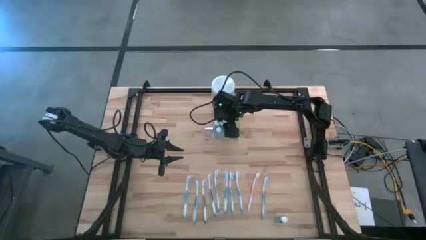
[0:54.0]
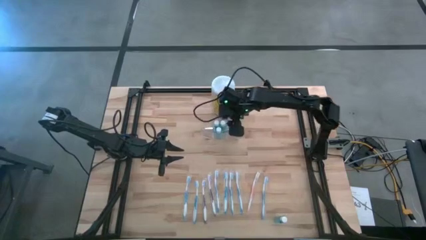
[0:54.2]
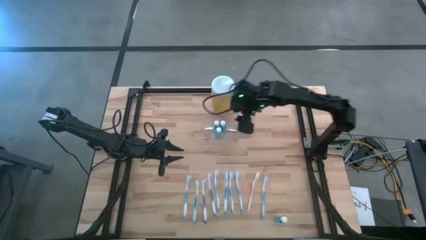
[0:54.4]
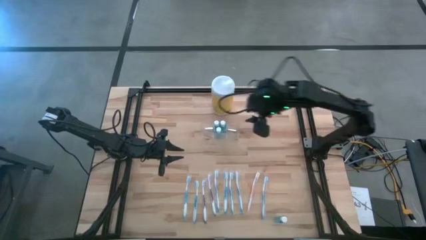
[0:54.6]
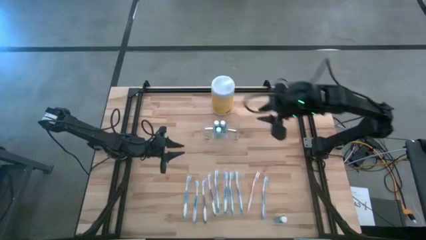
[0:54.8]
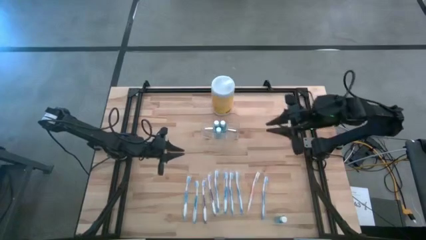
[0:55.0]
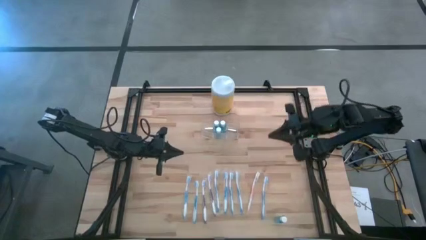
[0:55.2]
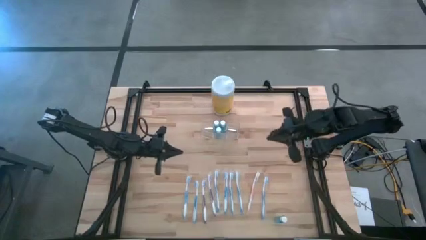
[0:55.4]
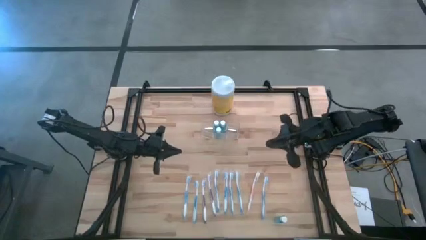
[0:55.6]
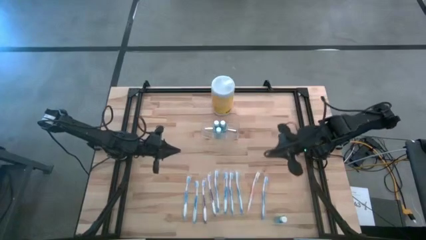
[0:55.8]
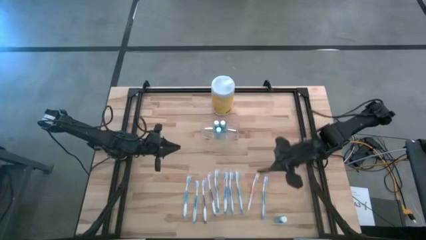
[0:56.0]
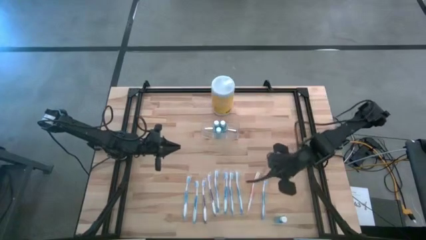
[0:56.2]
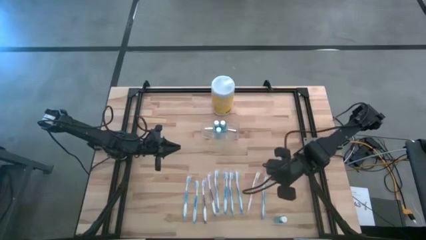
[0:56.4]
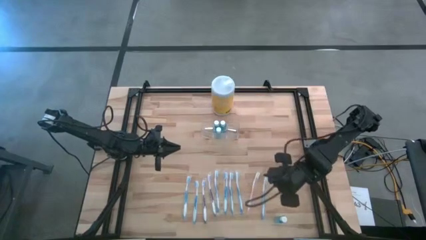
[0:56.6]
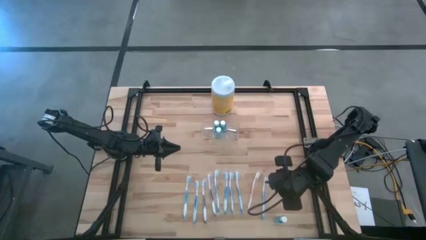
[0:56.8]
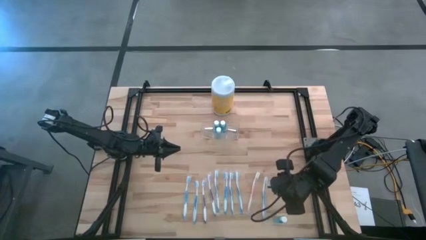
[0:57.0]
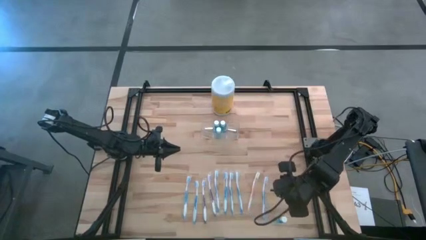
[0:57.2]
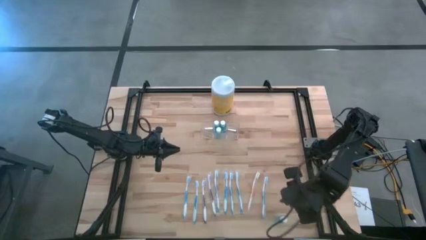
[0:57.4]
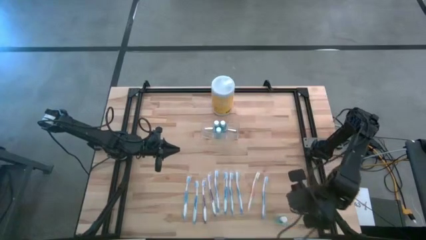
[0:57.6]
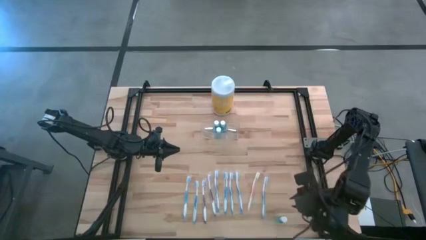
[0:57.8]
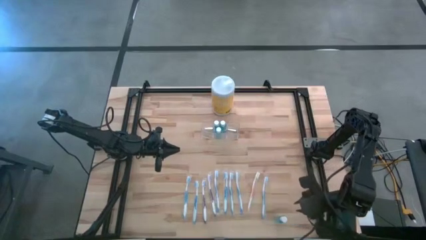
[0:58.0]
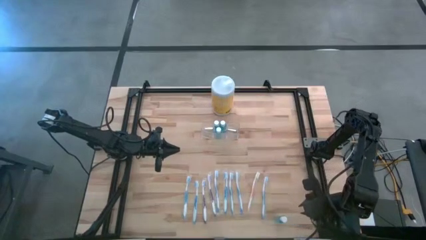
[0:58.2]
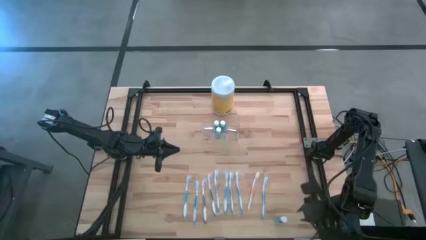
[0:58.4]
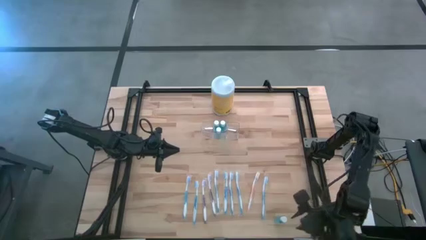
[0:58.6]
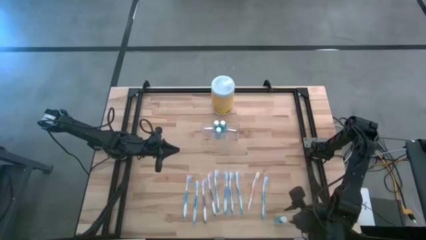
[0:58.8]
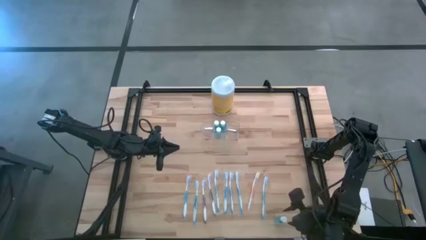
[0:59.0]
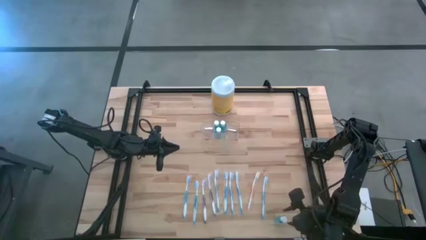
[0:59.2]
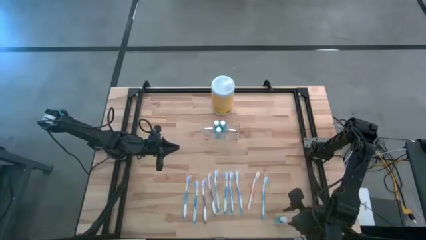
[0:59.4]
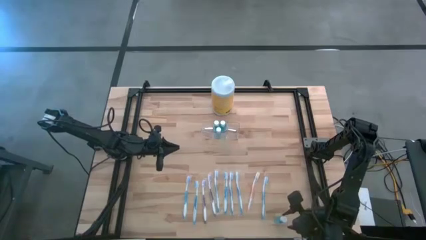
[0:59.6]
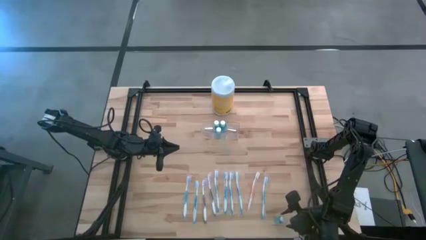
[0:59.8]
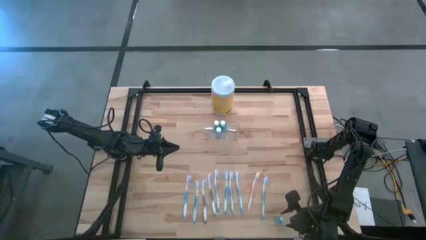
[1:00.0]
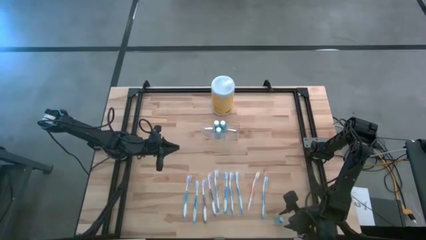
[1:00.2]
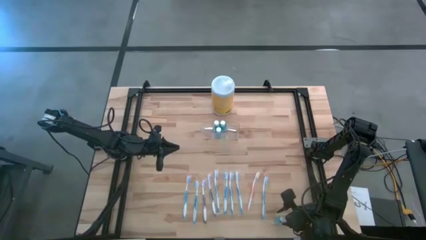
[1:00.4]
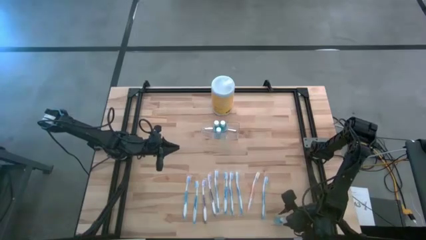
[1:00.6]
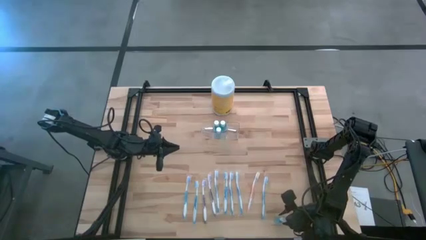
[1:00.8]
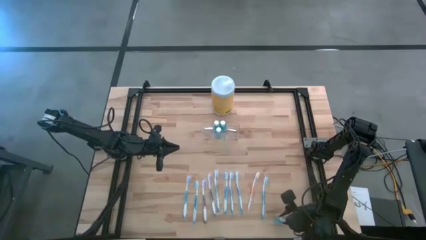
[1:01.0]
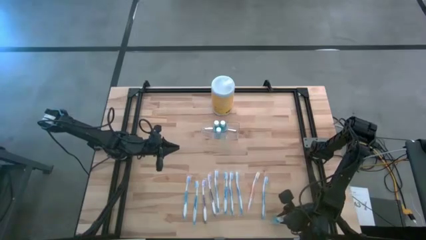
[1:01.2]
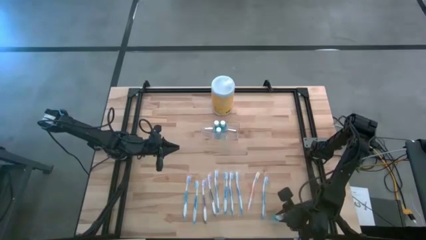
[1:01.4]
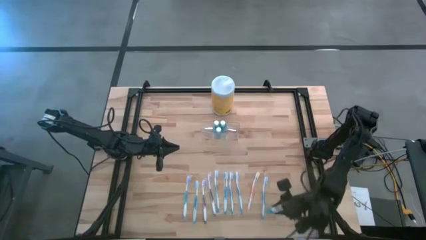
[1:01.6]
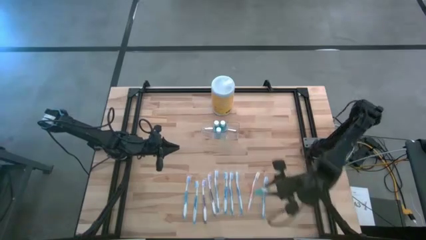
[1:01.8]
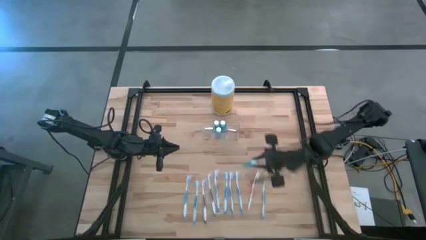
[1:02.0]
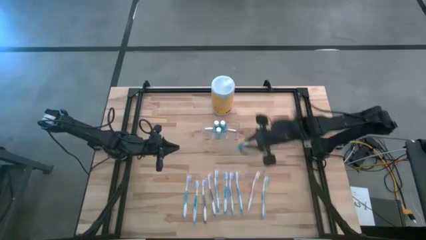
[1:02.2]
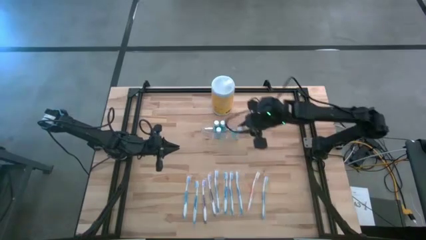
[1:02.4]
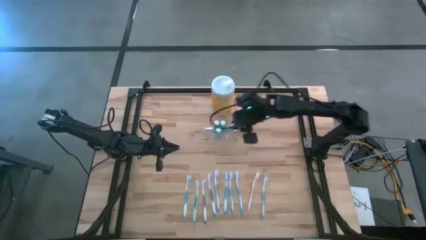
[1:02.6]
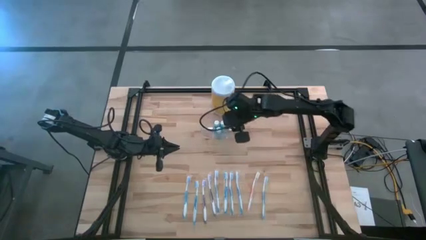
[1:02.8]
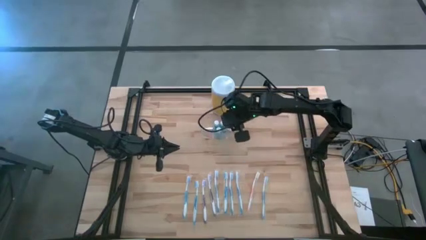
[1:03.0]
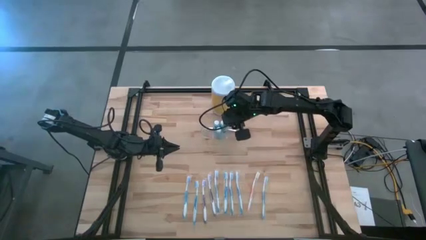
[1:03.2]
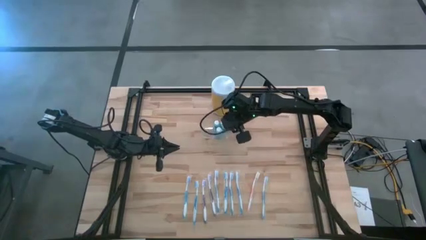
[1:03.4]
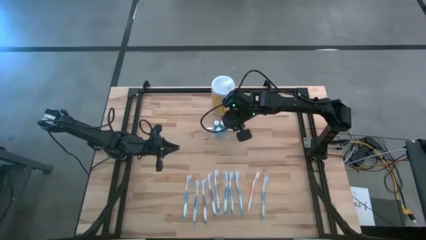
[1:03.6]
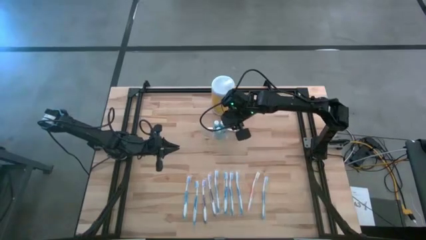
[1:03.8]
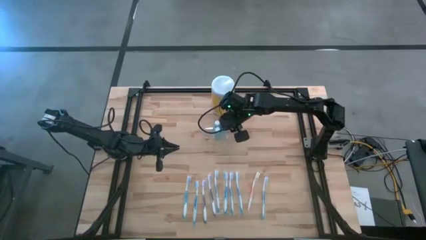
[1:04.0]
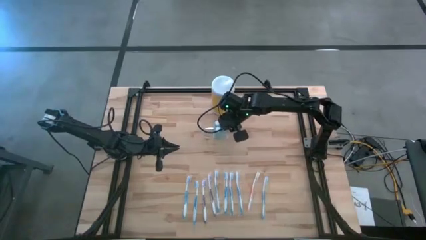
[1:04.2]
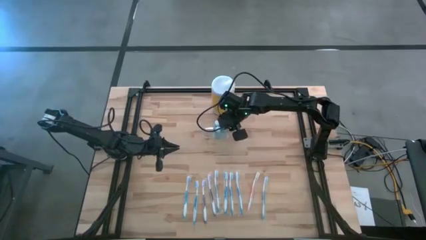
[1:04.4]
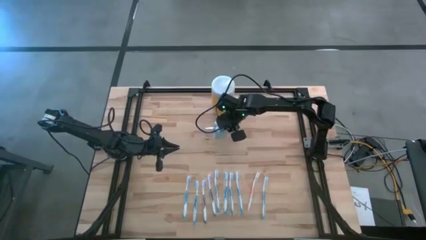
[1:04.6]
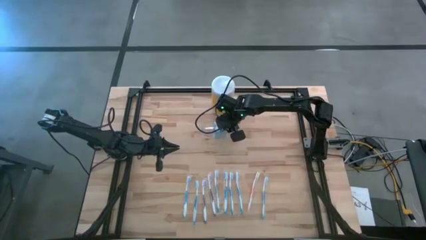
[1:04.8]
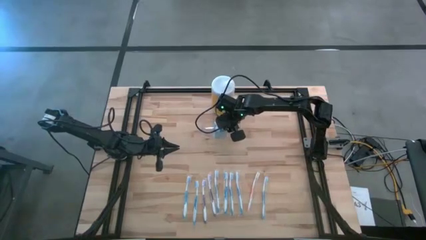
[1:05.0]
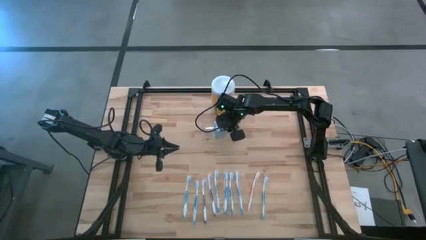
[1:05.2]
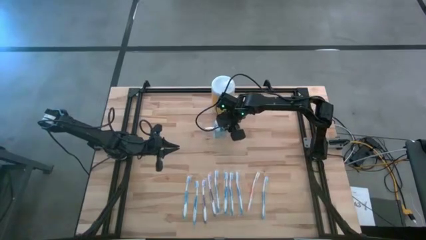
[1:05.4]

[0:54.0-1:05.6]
Task: Pick & Place toothbrushing station
Put the blue mouthwash into the transparent organizer

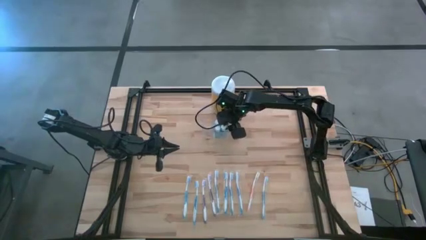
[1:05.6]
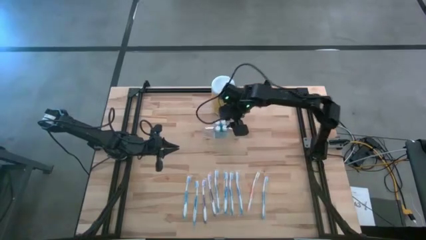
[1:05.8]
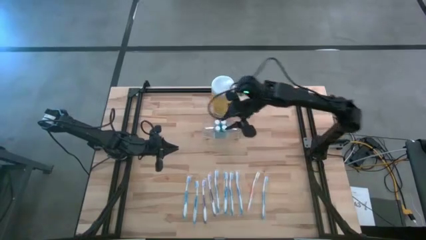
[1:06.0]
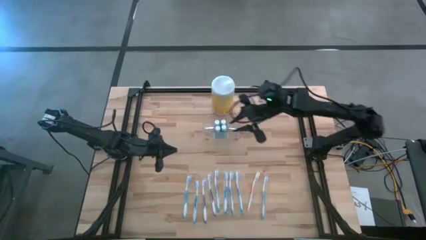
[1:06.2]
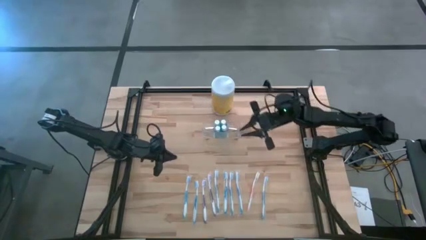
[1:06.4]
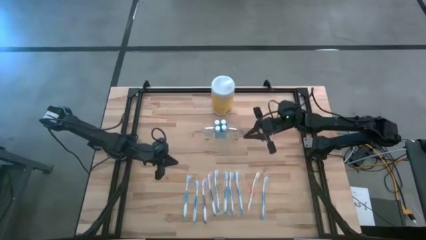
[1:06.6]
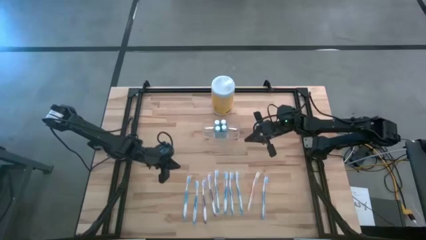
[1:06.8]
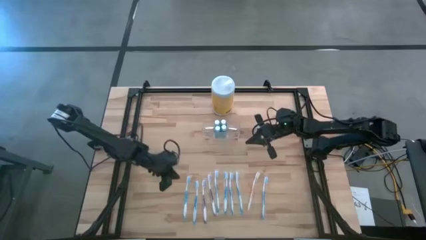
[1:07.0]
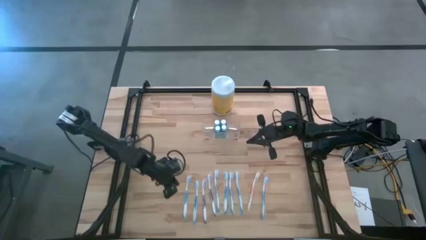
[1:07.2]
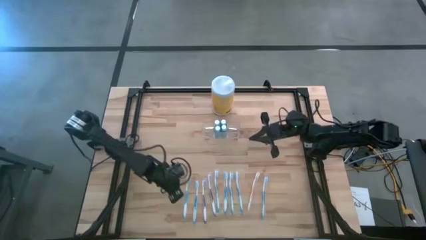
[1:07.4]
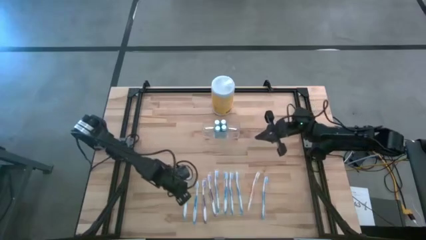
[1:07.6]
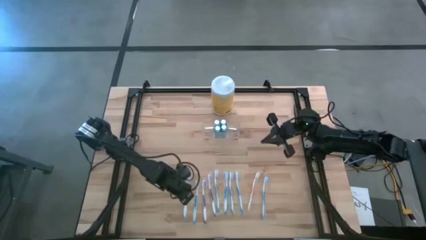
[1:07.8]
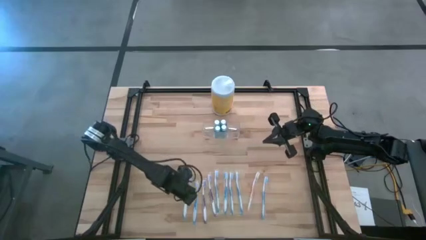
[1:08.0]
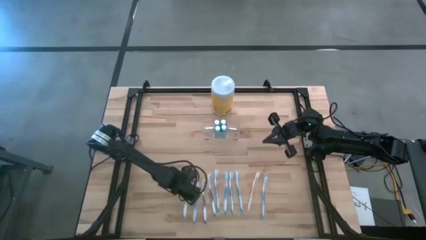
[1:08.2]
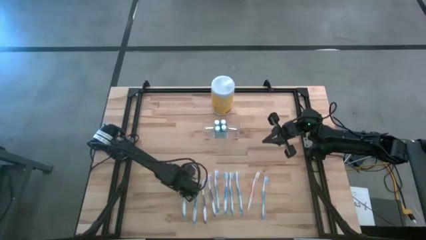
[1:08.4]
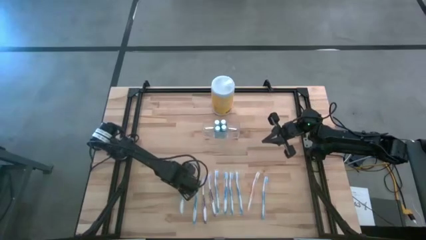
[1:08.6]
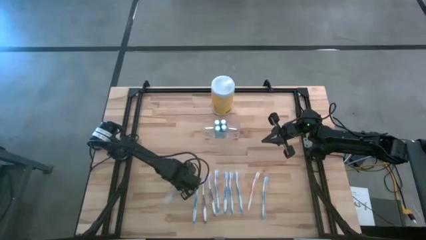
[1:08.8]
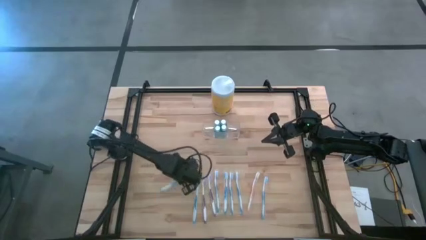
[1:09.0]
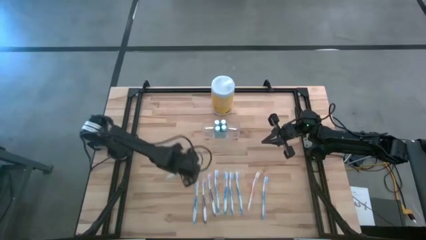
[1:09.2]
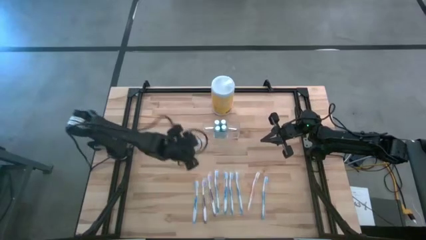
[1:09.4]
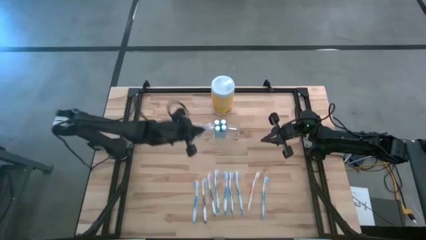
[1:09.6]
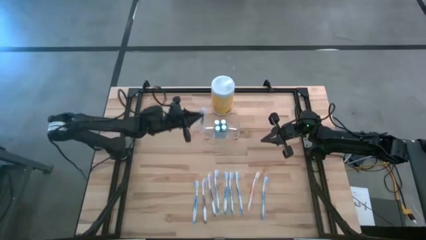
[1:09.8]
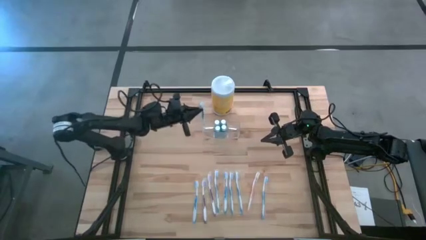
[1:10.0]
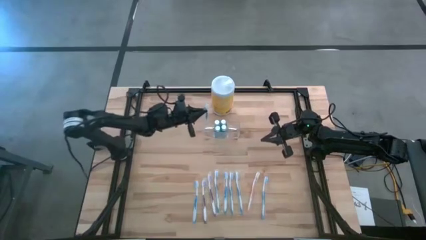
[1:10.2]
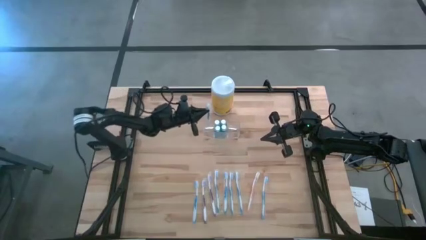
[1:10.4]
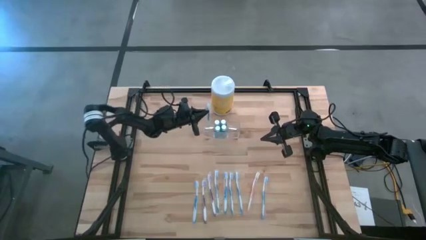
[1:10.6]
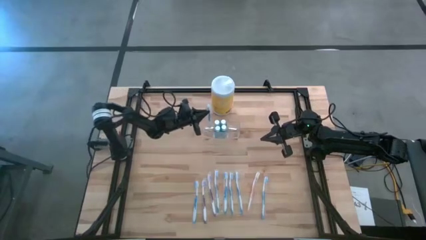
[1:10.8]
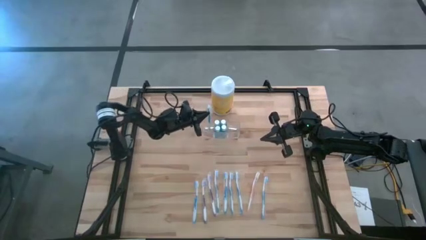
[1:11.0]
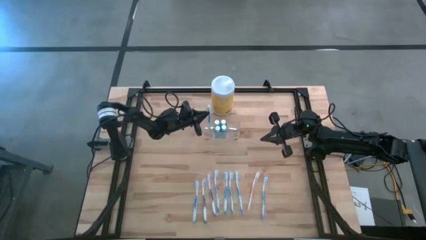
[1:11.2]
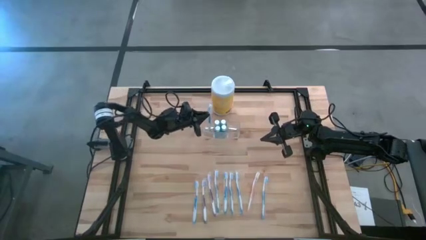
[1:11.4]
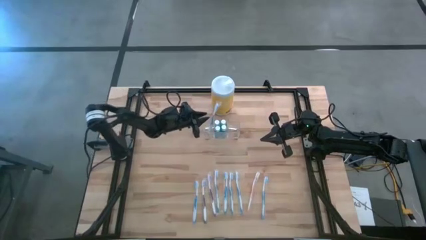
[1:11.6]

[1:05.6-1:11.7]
Put the blue toothbrush into the transparent organizer
